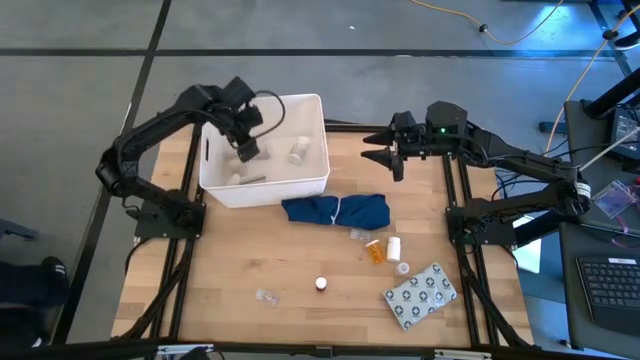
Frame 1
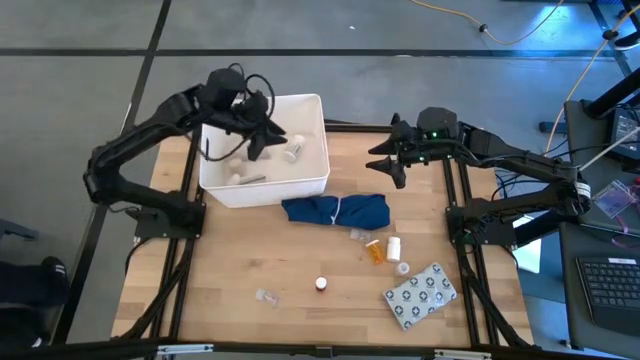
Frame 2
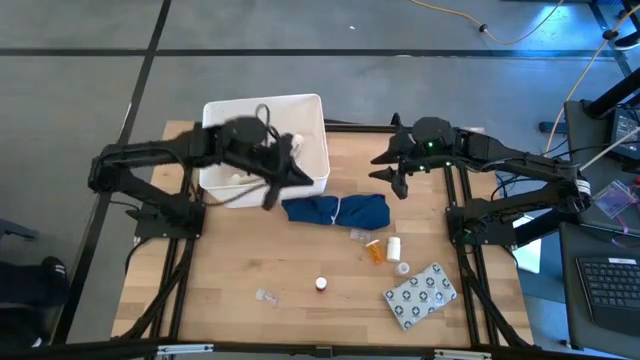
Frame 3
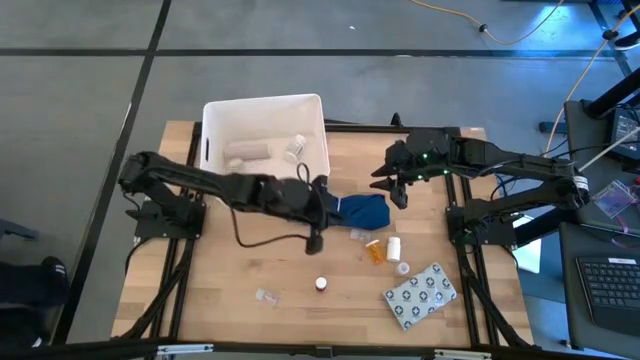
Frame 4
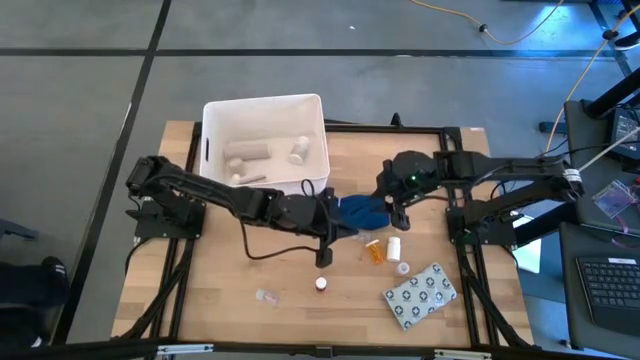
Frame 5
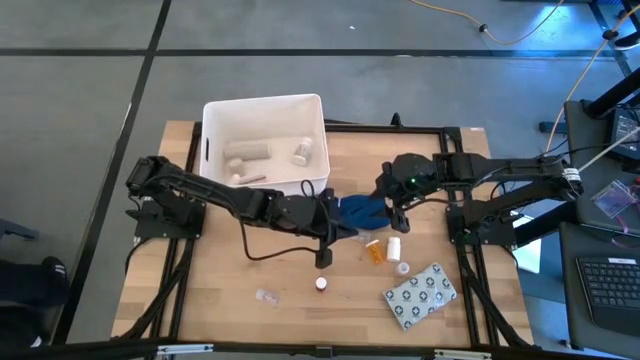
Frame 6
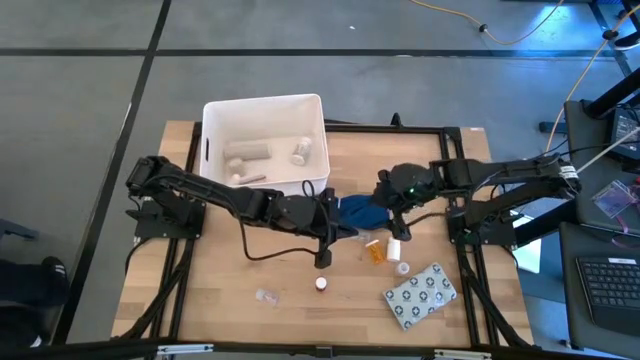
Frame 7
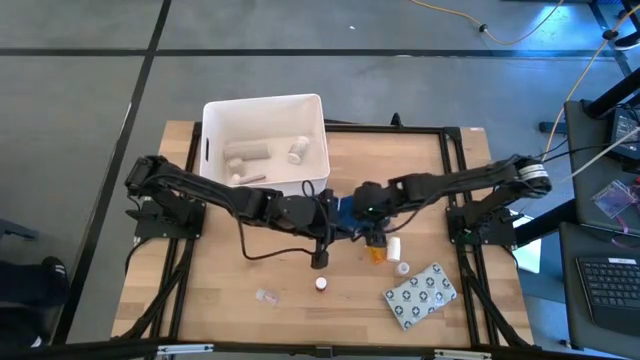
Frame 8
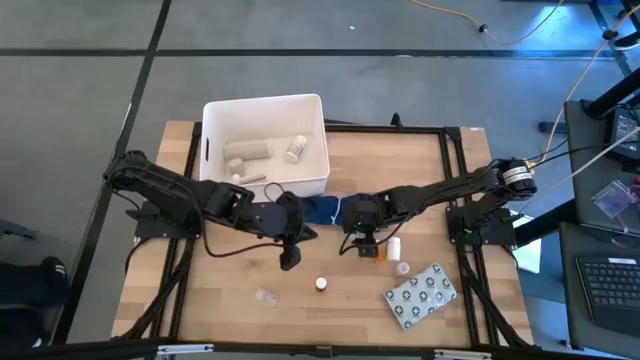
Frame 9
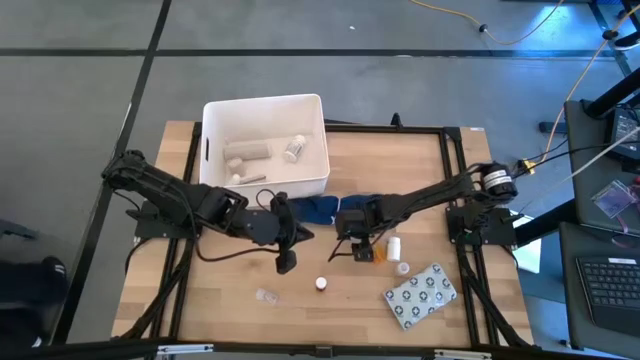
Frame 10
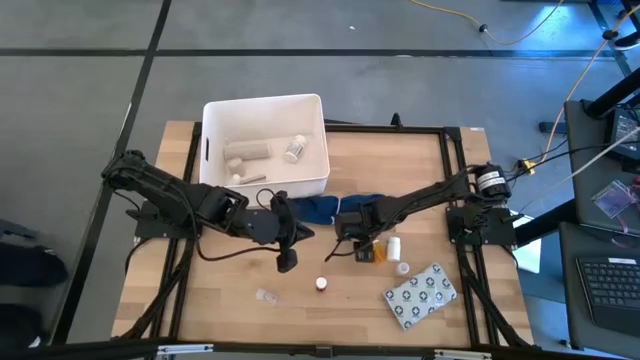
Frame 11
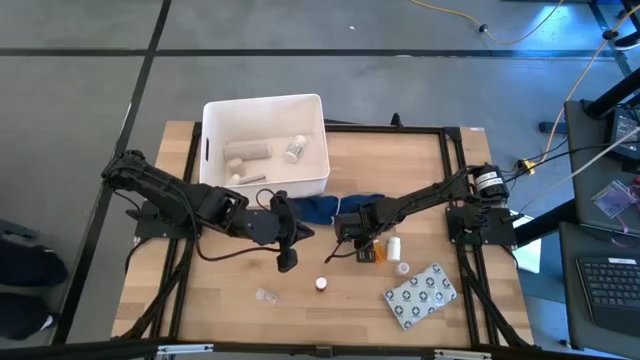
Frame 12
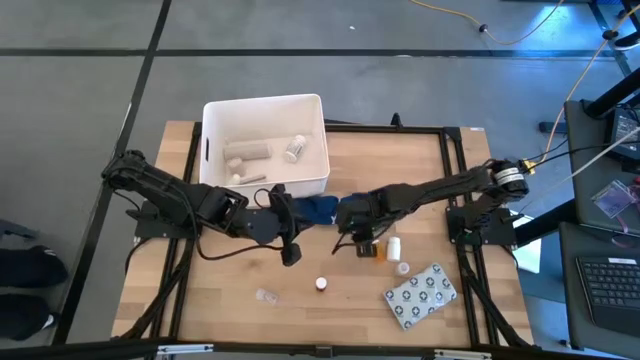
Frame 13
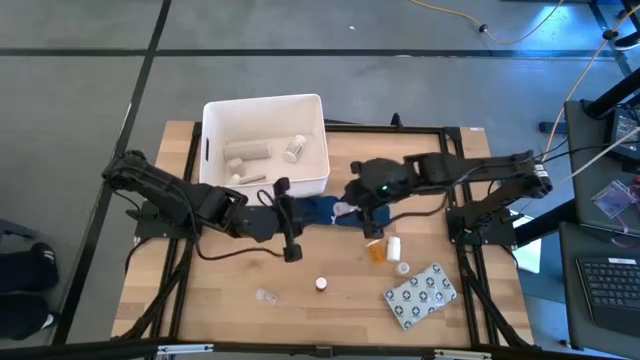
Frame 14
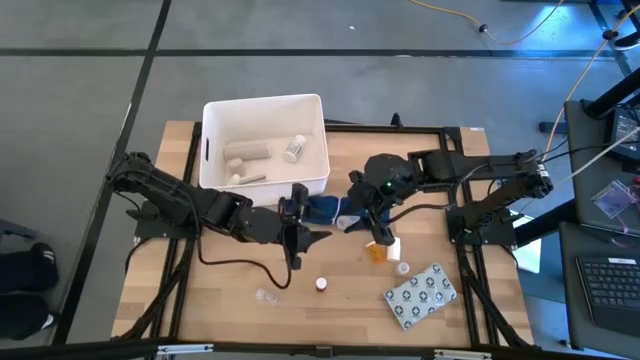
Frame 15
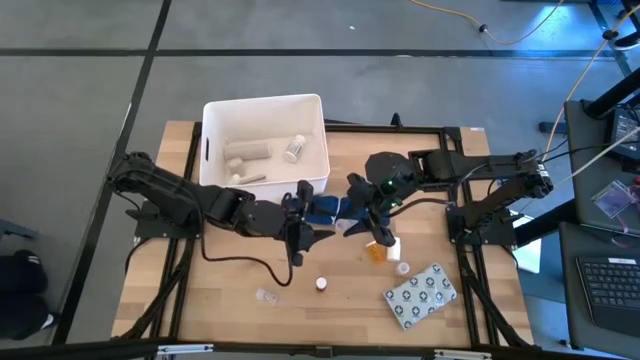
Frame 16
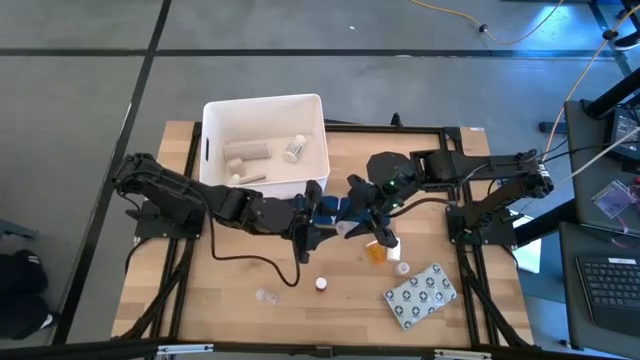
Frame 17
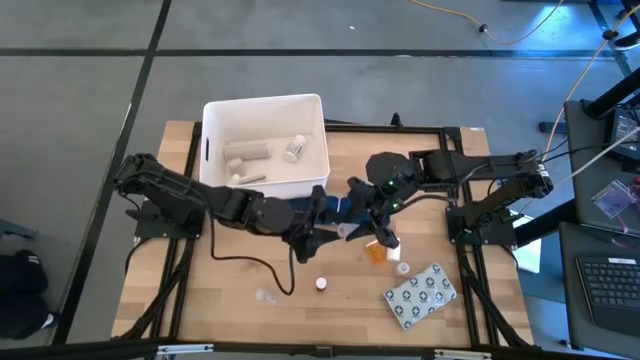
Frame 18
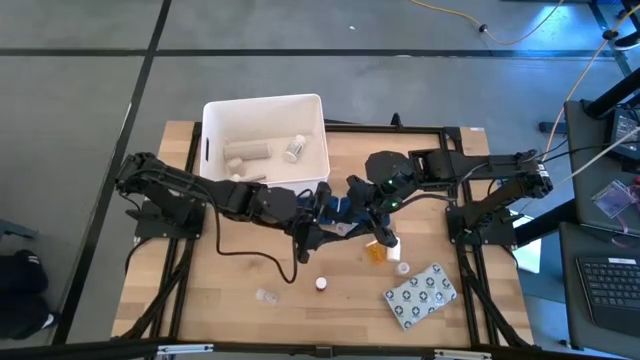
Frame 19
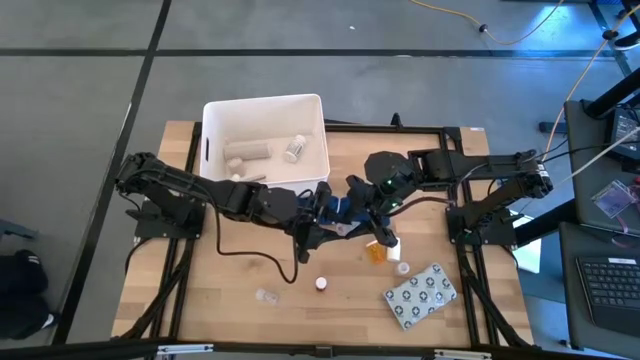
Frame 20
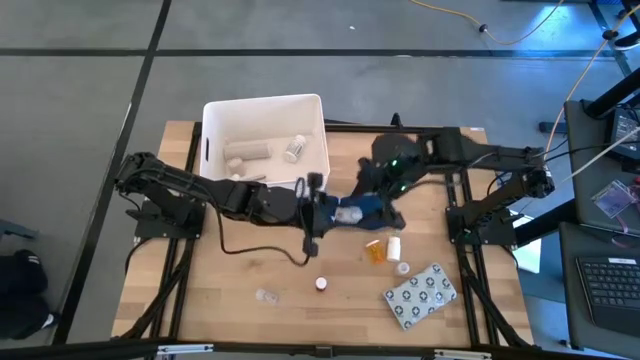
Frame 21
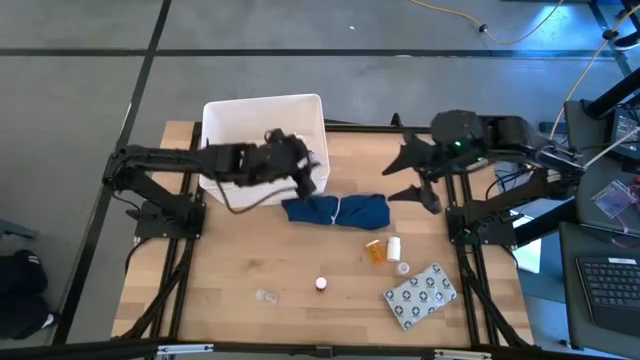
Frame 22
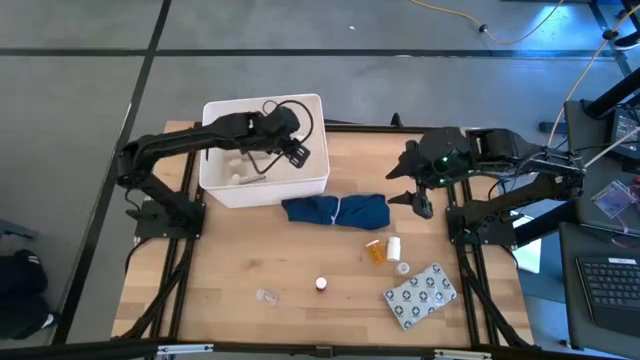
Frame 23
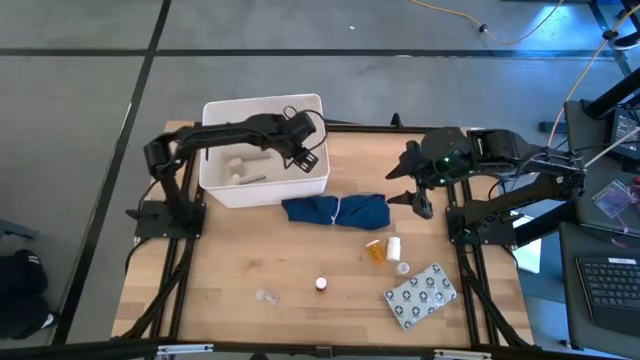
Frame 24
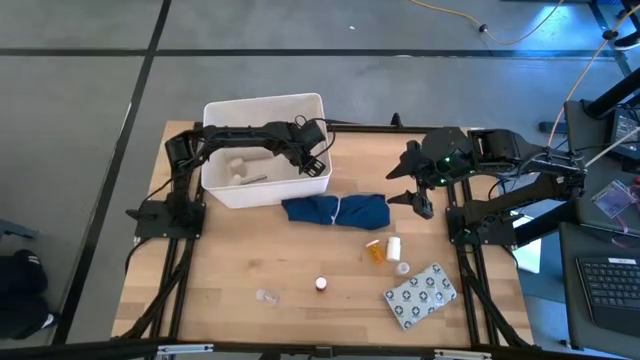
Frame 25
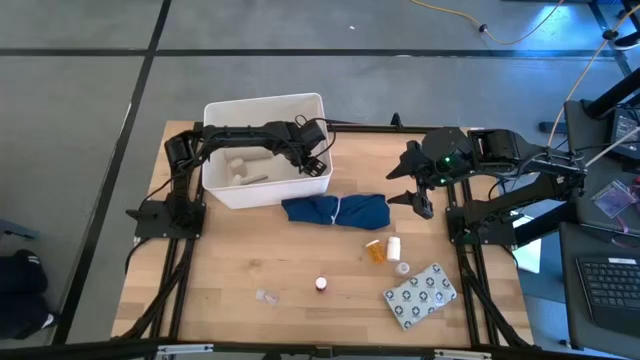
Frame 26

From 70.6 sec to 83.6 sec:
Task: Pick & place medical supplies in basket/bin
Put the top transparent pill bottle into the white container

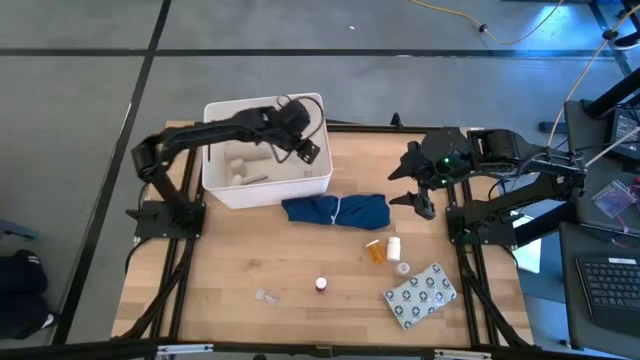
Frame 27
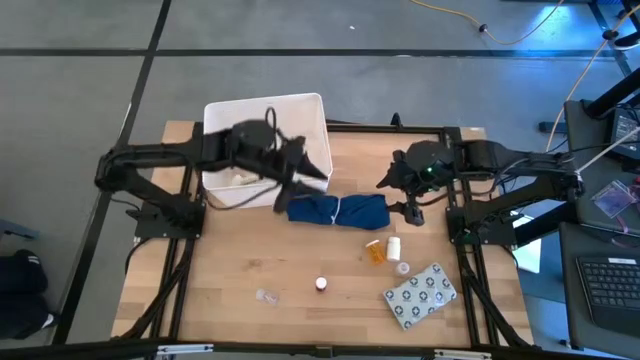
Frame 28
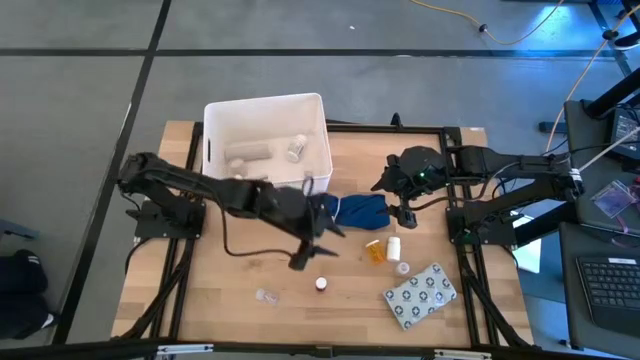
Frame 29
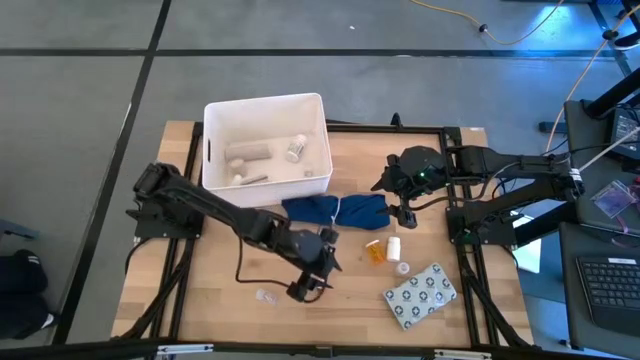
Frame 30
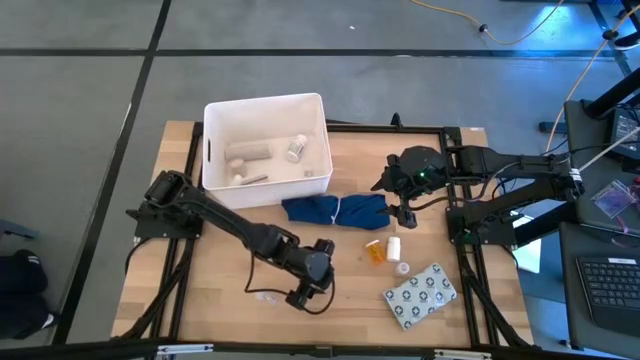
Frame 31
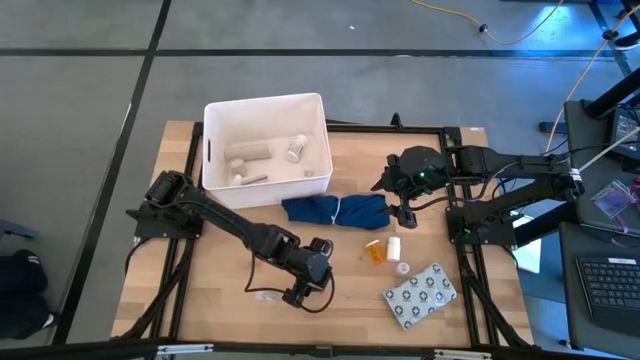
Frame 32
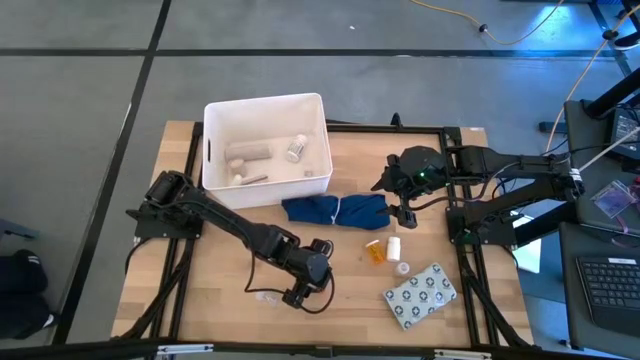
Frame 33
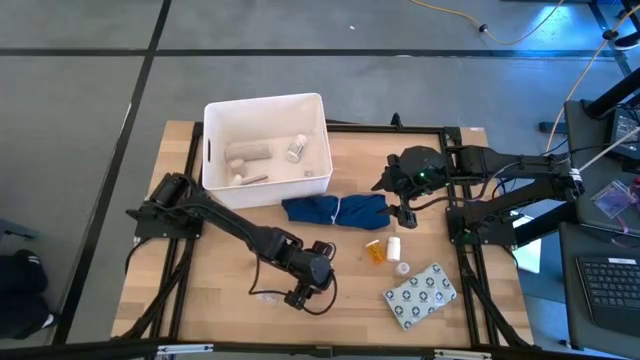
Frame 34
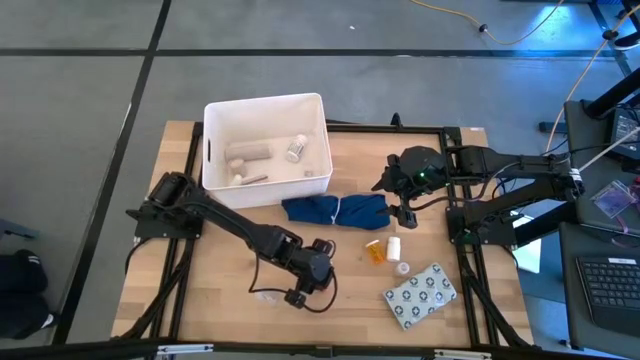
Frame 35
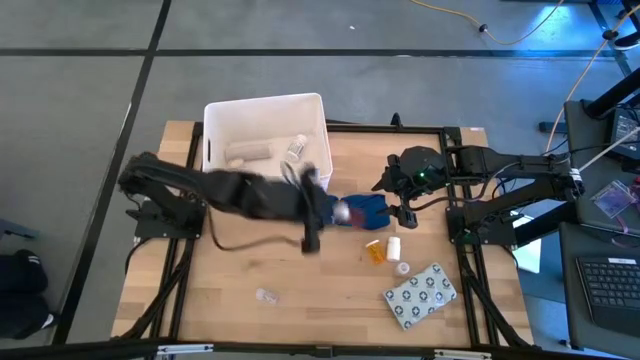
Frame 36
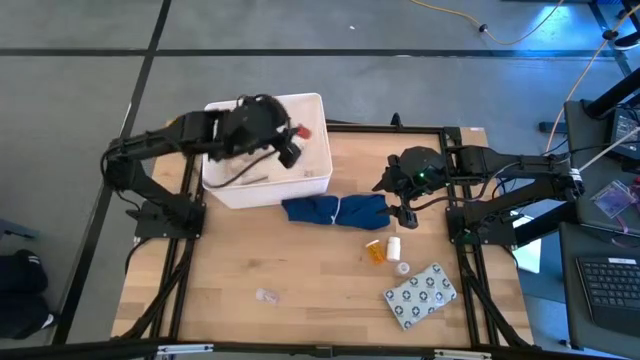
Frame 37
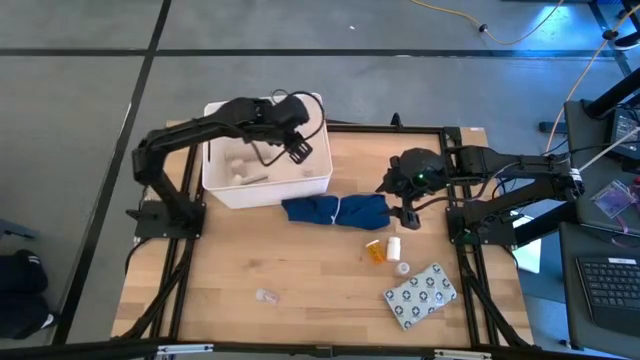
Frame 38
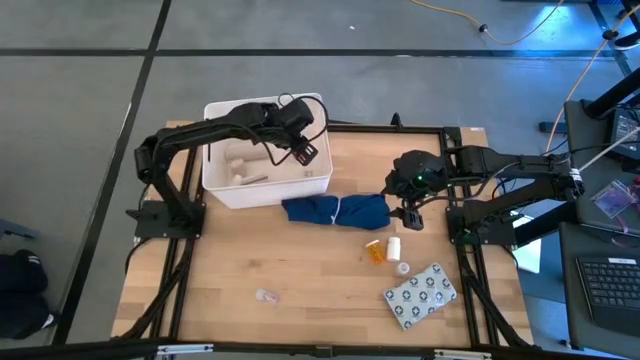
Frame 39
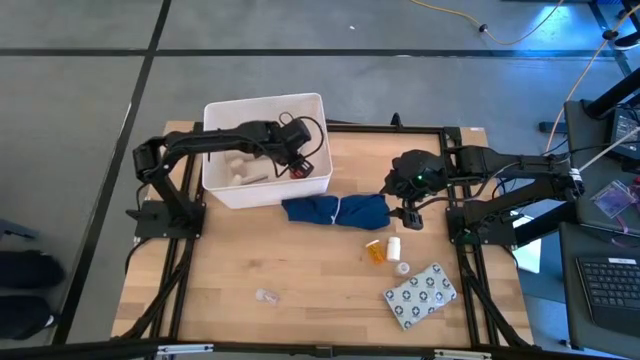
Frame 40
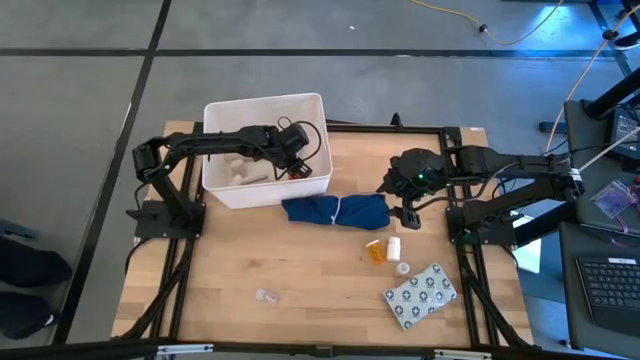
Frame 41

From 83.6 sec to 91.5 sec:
Put the red pill bottle into the white container

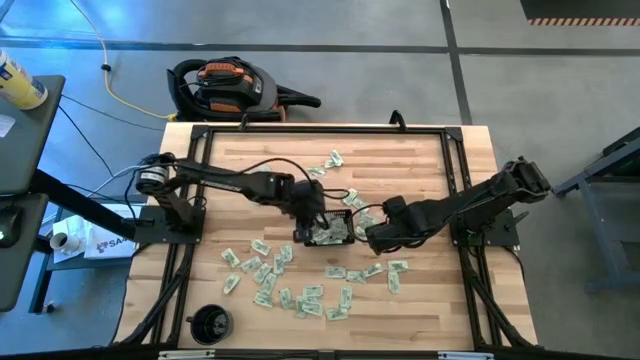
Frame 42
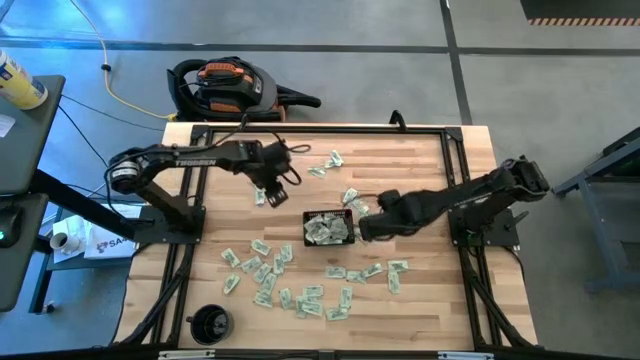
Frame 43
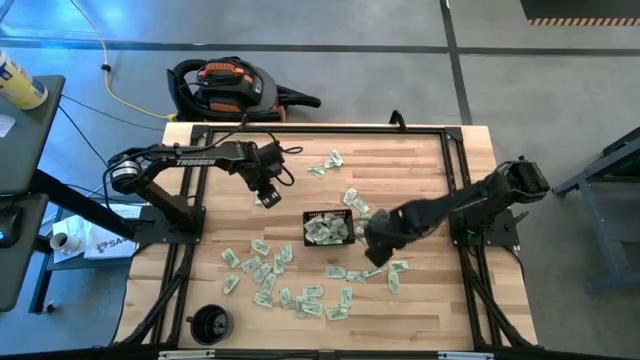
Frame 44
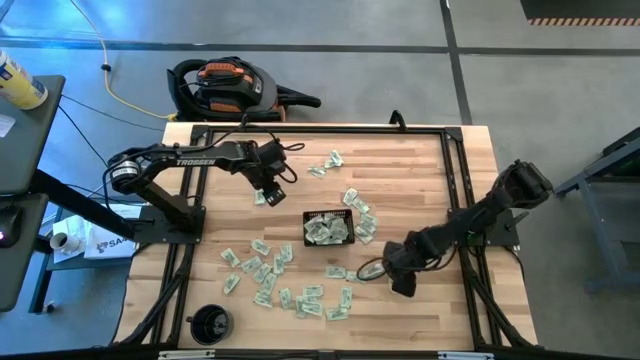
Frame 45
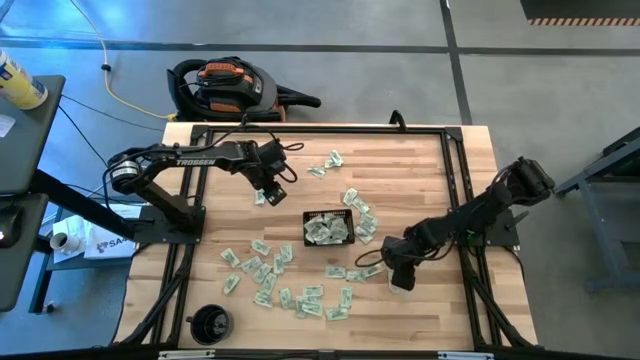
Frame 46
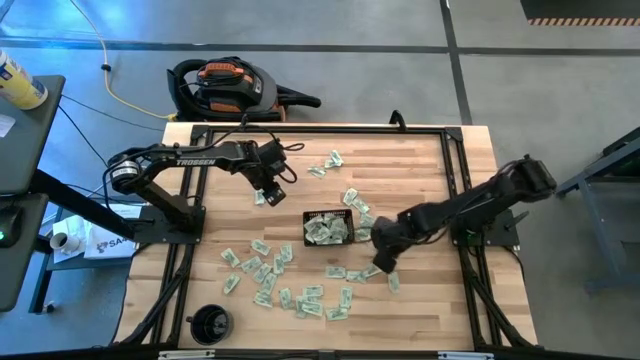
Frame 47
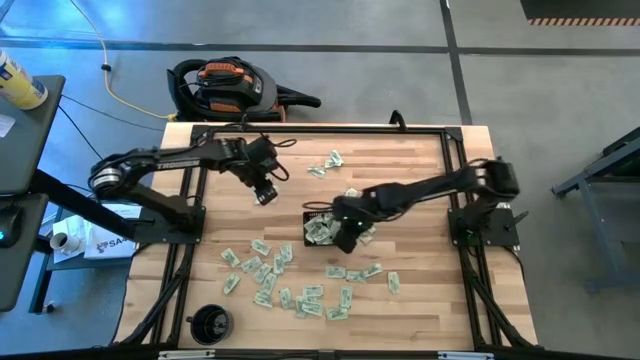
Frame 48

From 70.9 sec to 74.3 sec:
Task: Pick and place Stevia / Truvia into bins
Put the green stevia packet into the black basket
